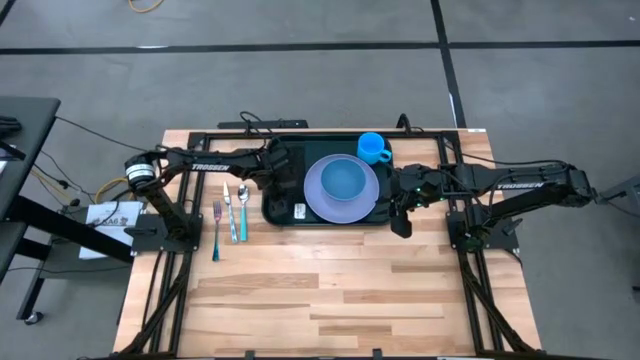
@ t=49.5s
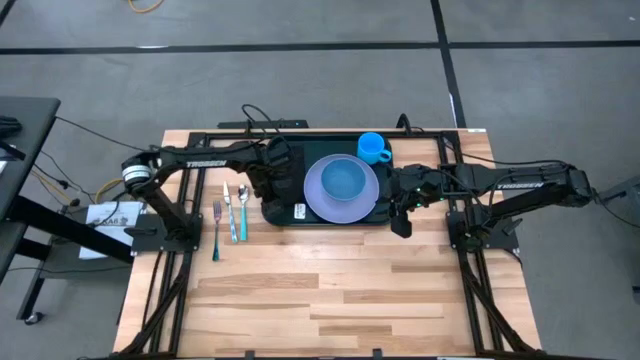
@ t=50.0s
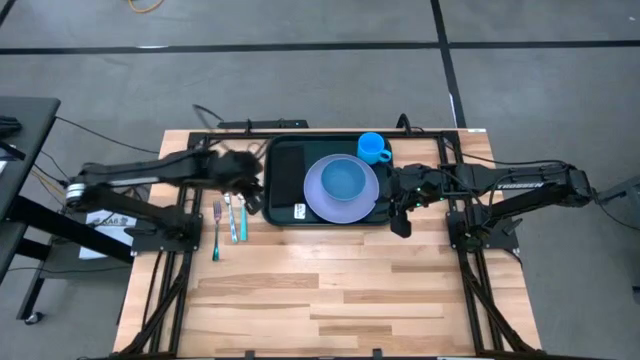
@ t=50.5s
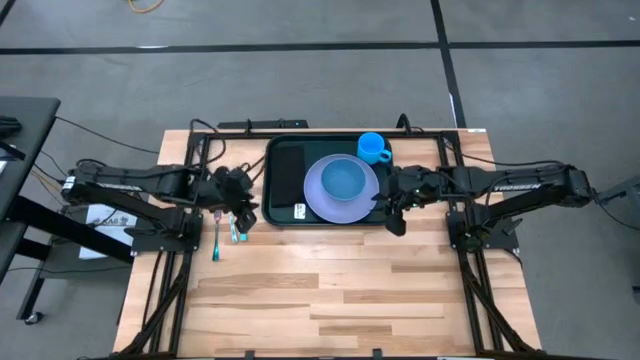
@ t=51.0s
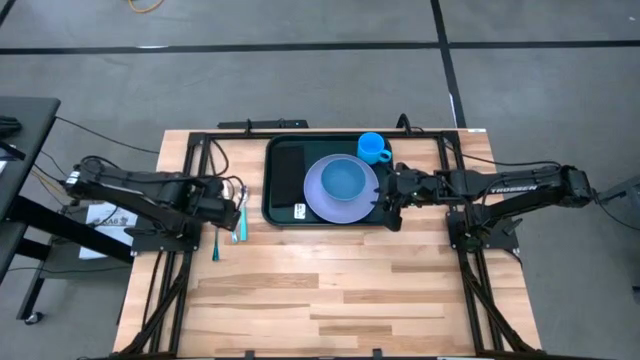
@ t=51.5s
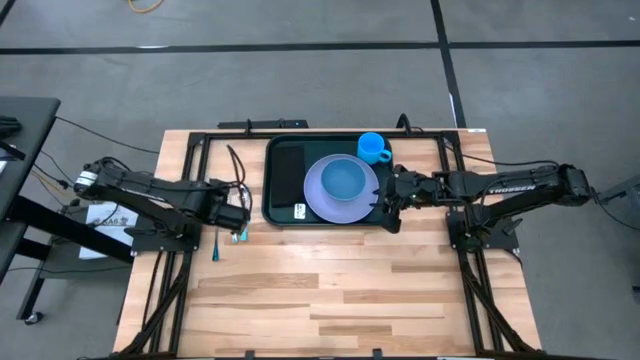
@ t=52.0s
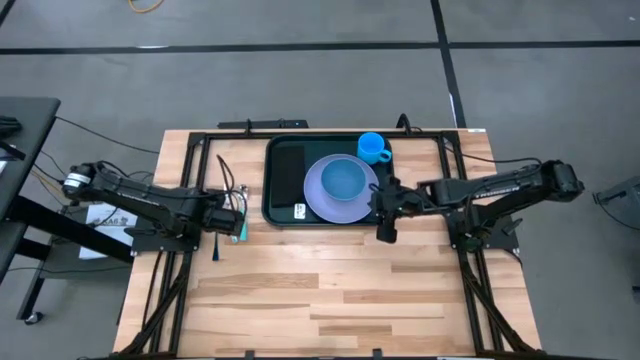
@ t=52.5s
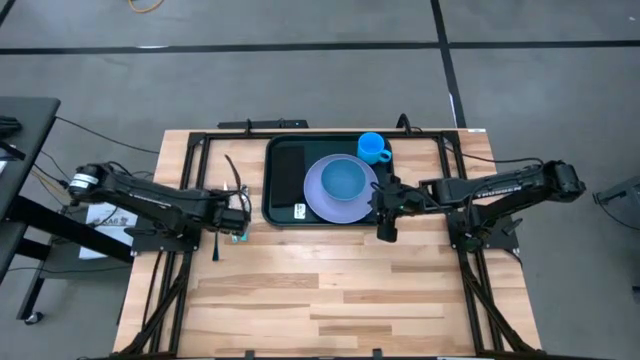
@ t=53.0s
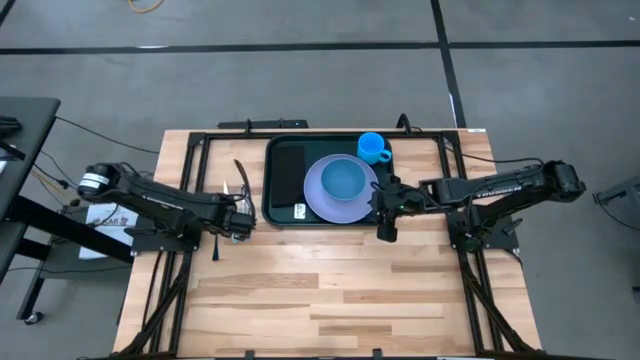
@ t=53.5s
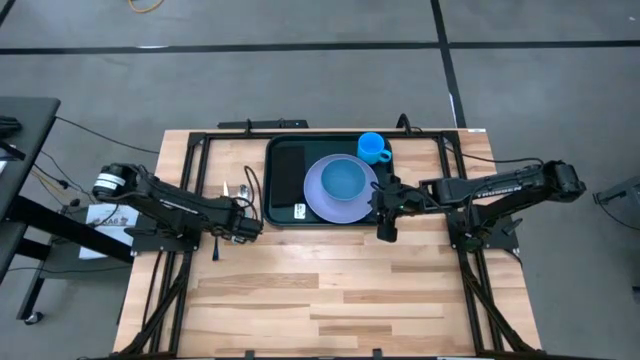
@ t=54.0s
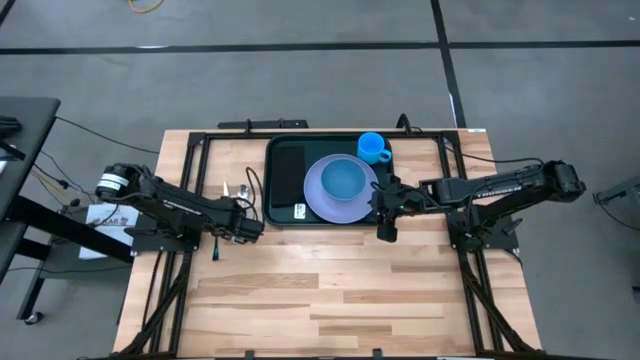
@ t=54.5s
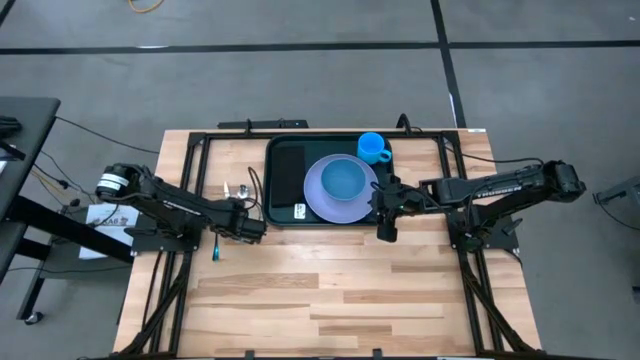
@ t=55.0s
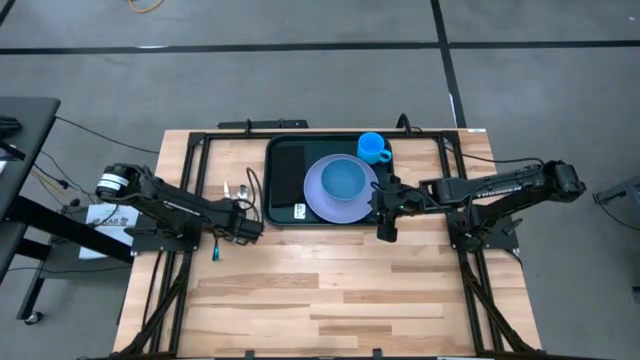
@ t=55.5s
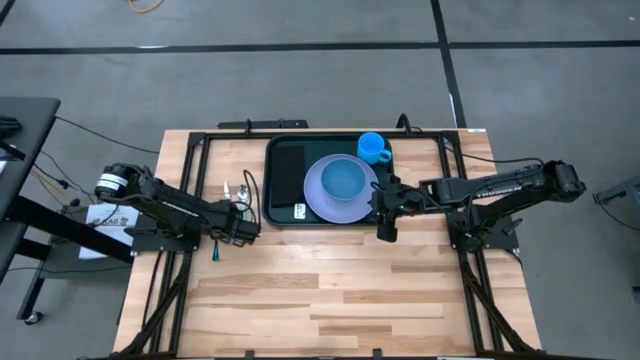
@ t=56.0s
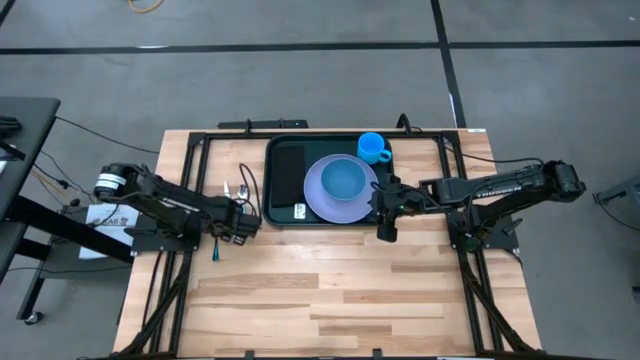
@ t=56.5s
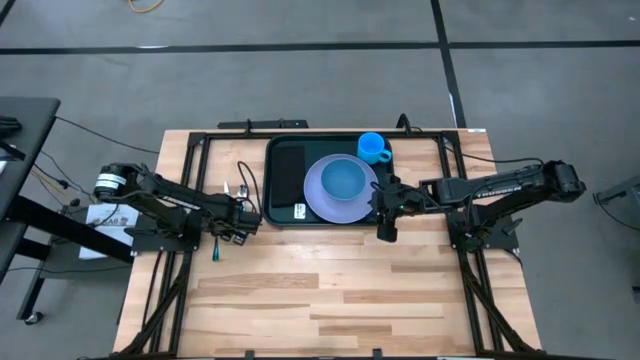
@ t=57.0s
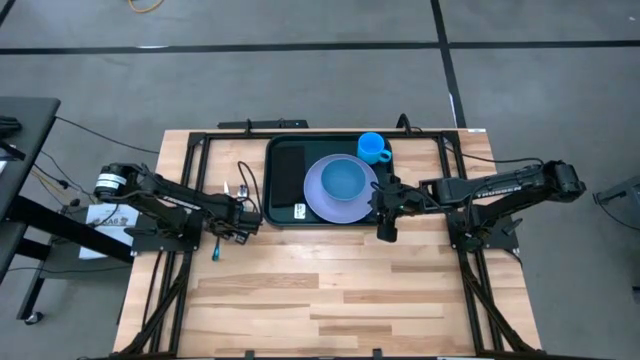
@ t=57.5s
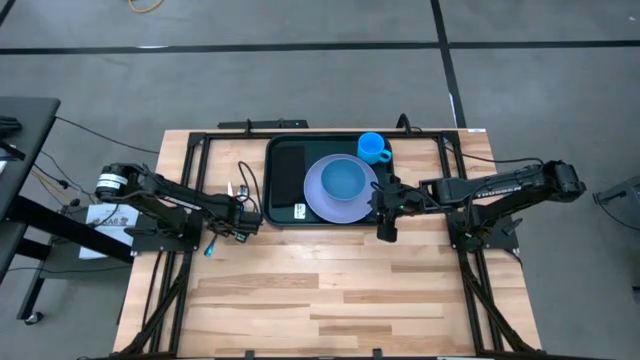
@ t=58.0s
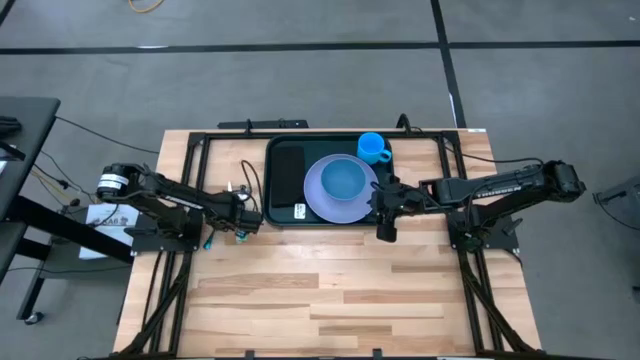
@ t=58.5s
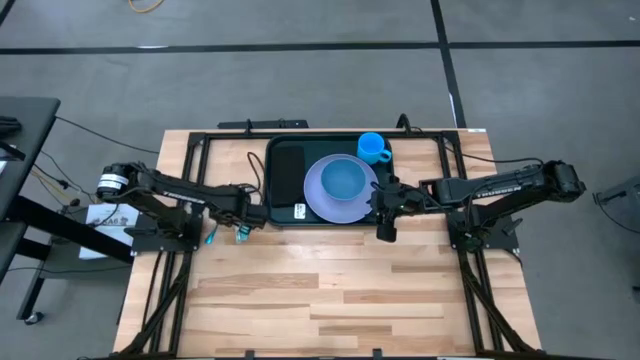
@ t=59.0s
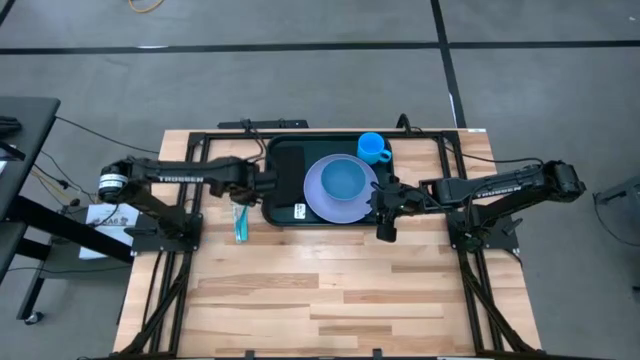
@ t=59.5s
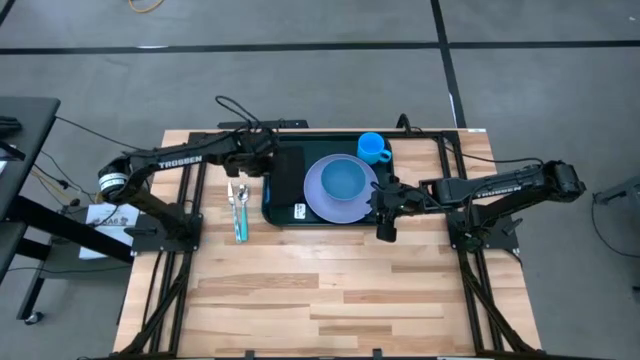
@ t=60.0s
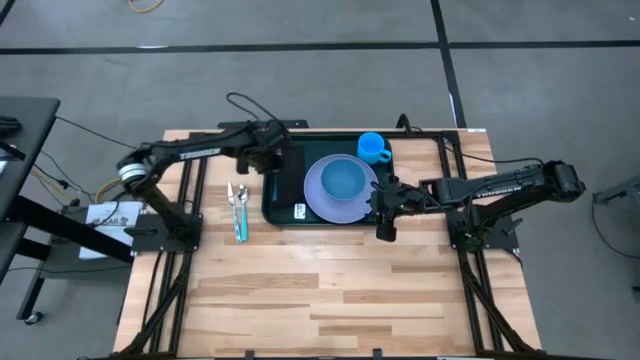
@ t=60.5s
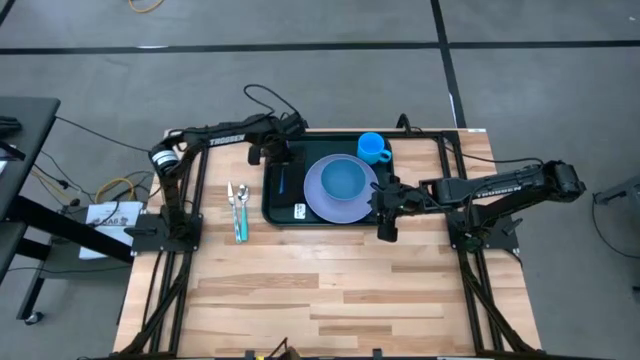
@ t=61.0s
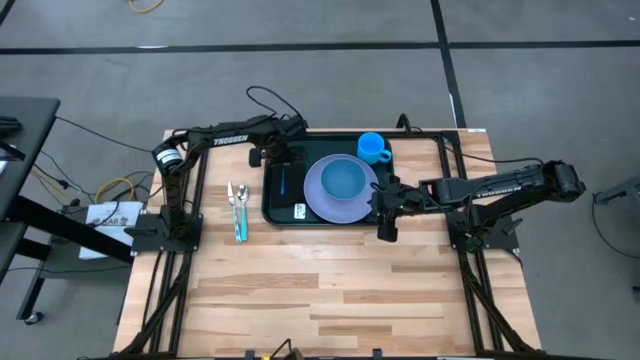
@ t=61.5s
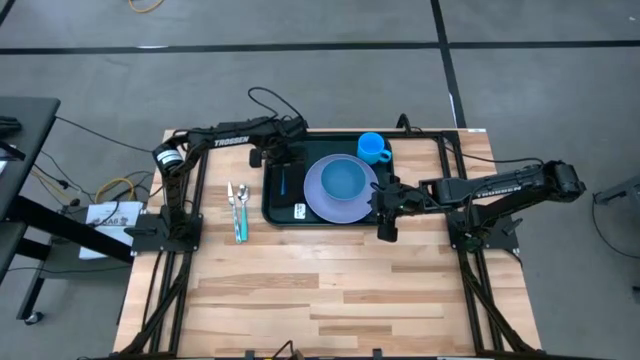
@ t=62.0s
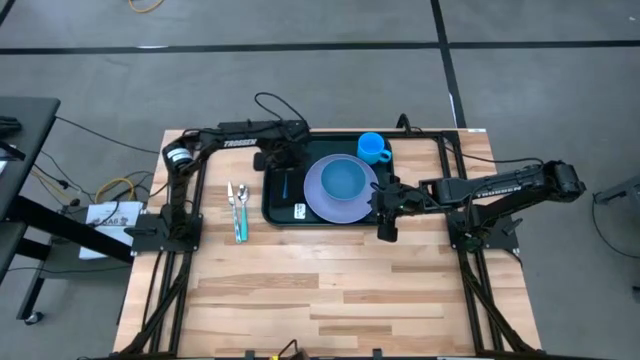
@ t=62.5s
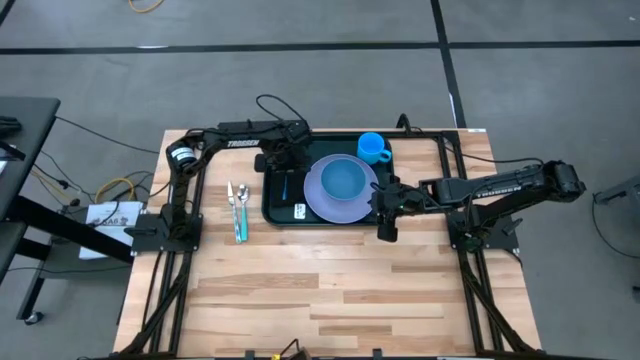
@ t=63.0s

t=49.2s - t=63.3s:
Task: Set up tray
Put the violet fork on top of the black napkin

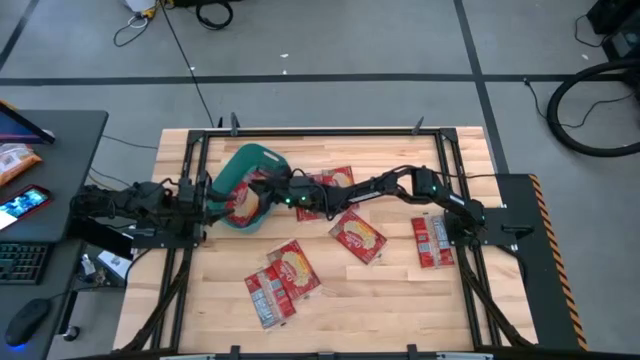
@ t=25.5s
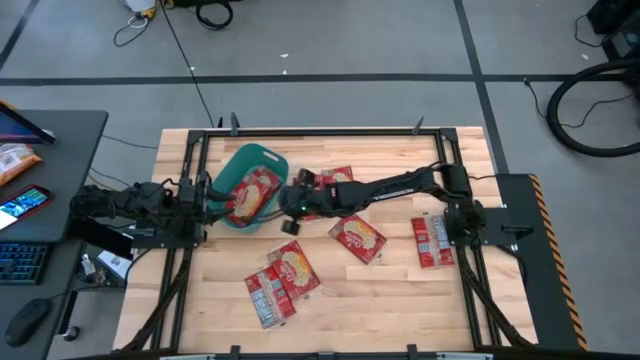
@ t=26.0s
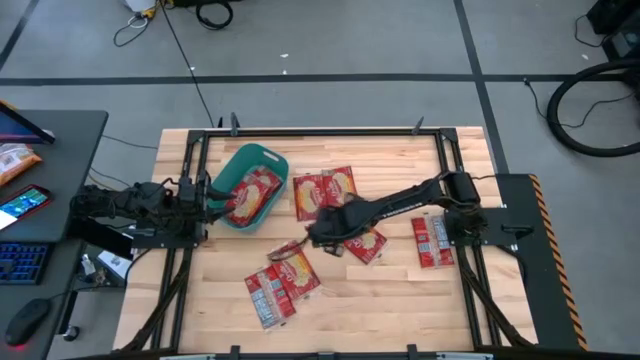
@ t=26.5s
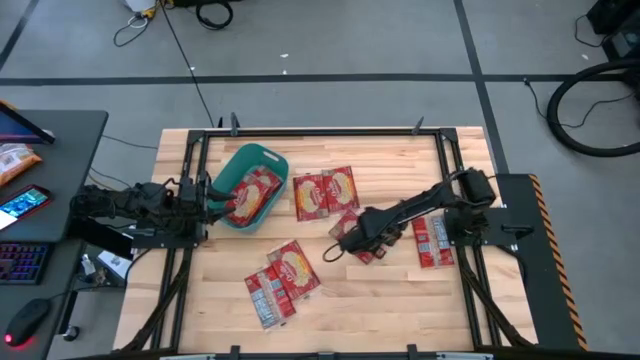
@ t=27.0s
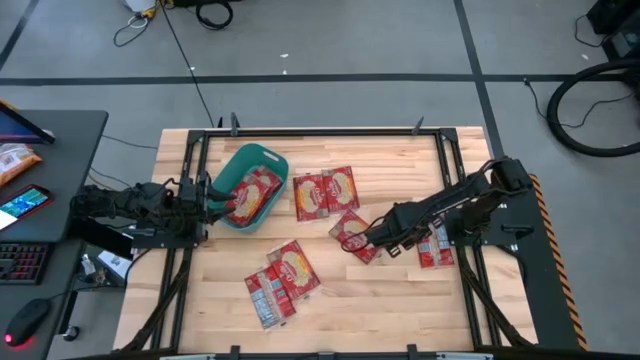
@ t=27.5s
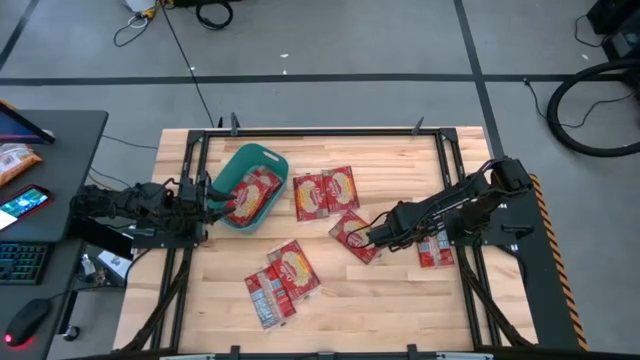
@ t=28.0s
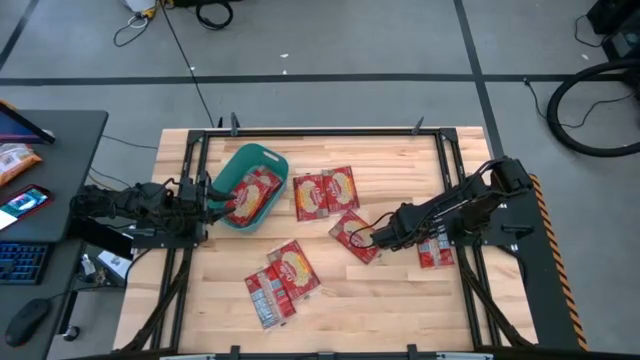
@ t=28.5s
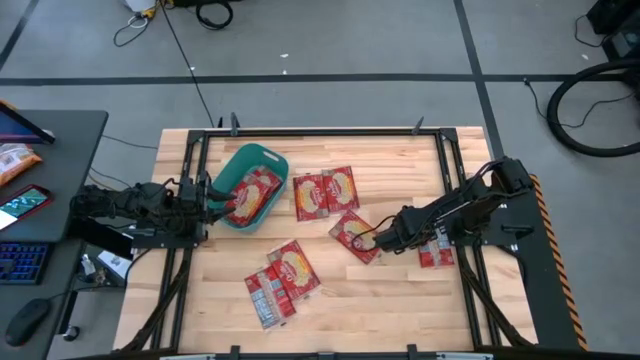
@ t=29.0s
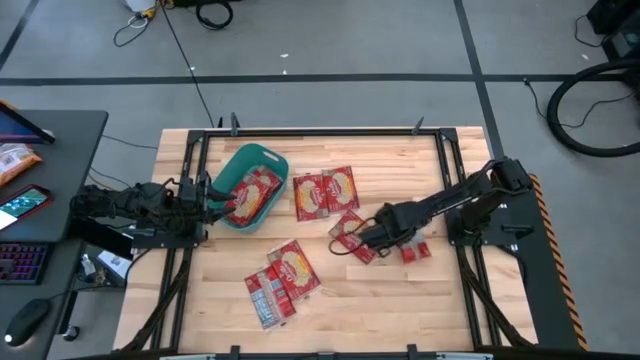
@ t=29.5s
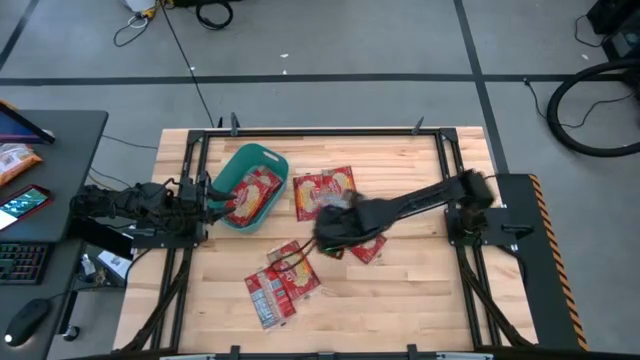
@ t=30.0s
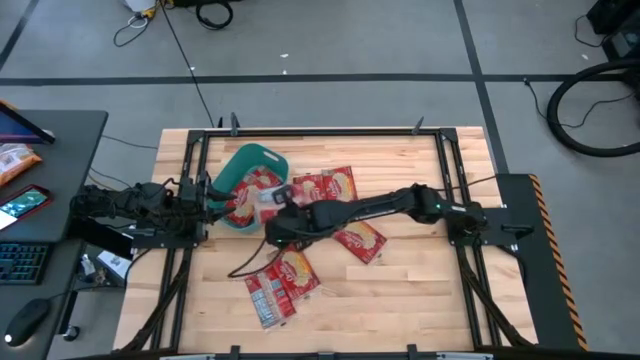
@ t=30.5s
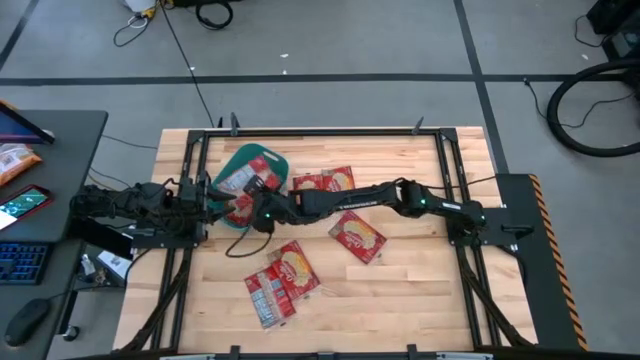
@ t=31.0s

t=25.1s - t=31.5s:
Task: Sort popcorn bags into baskets
Put the red popcorn bag into the green bin
